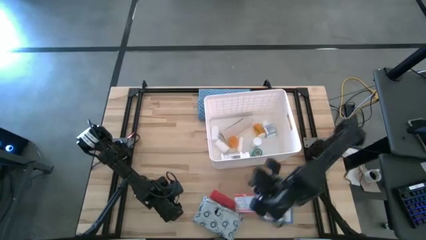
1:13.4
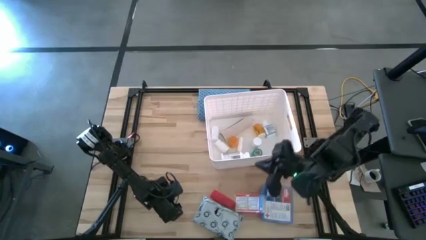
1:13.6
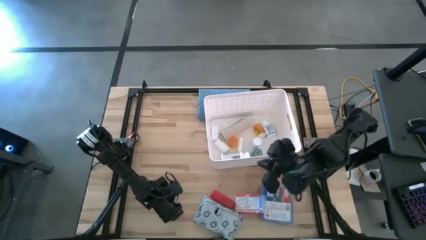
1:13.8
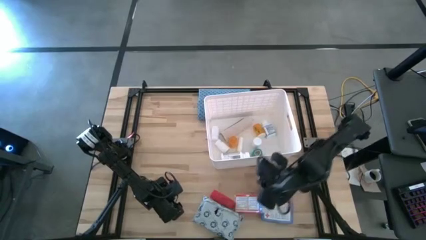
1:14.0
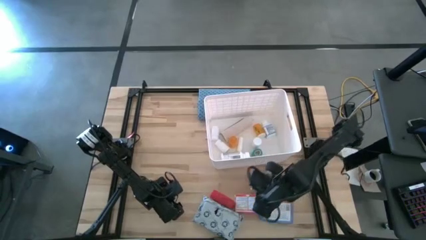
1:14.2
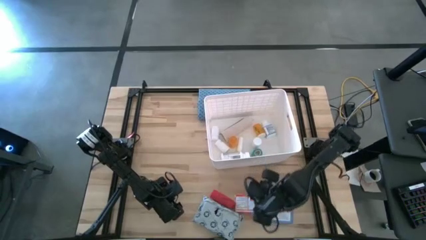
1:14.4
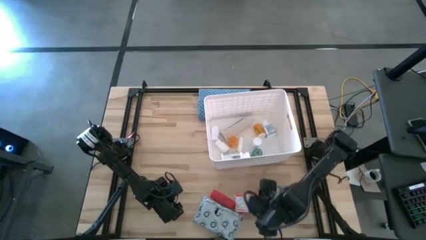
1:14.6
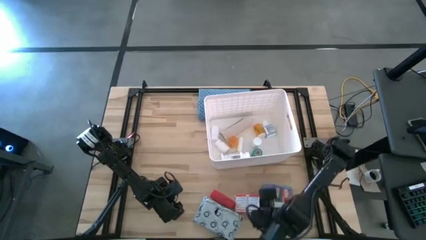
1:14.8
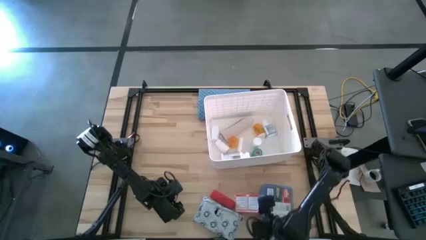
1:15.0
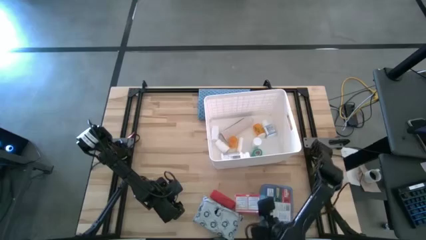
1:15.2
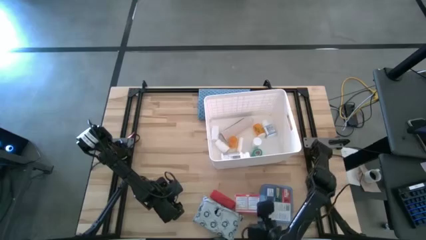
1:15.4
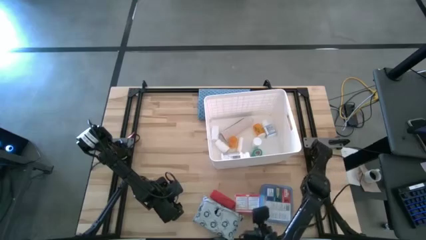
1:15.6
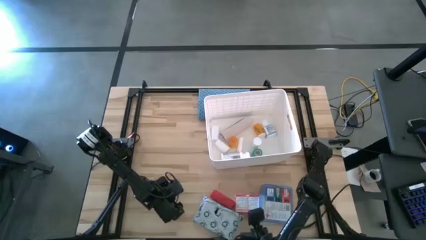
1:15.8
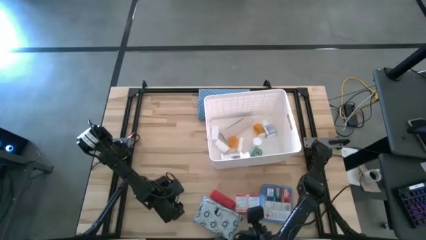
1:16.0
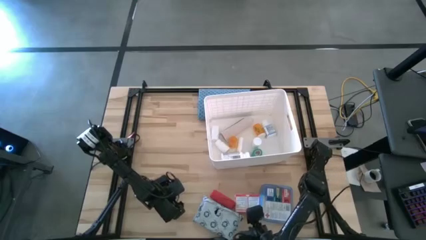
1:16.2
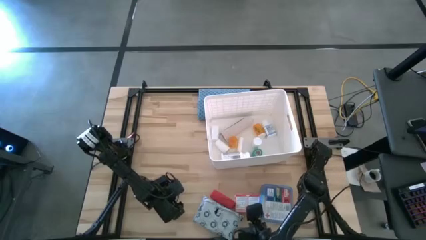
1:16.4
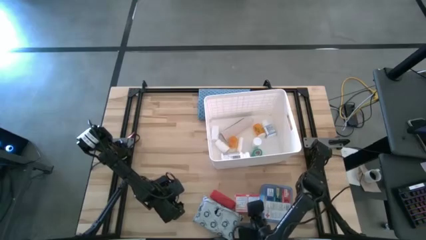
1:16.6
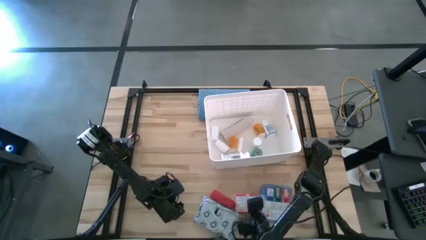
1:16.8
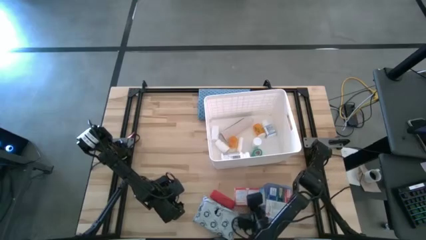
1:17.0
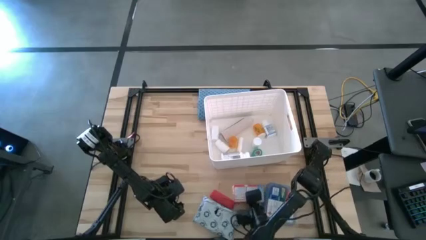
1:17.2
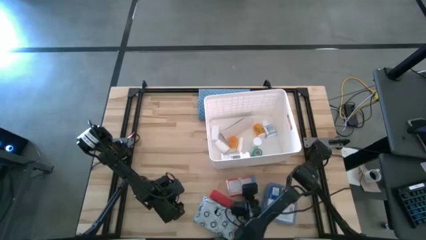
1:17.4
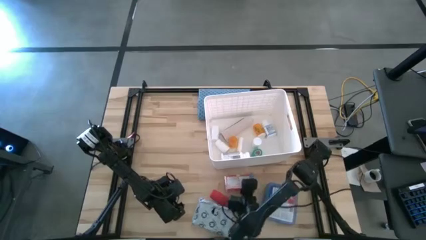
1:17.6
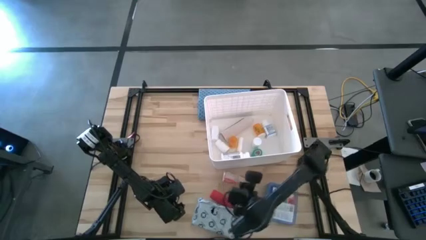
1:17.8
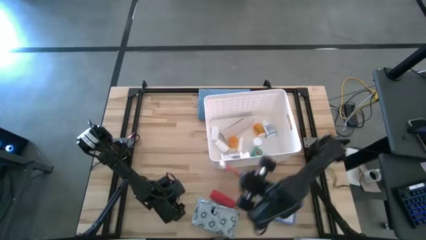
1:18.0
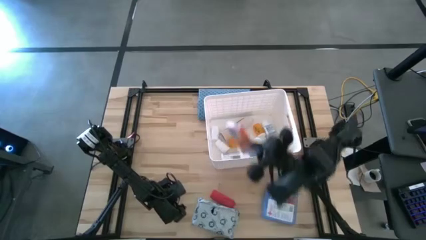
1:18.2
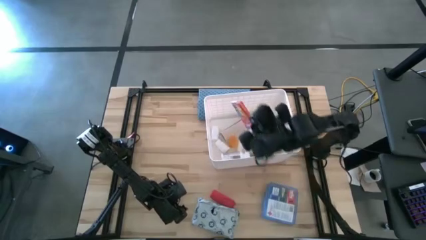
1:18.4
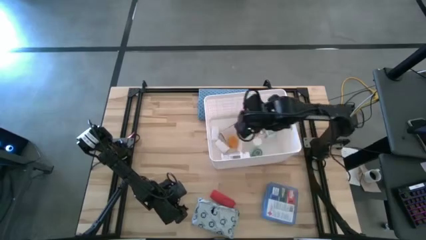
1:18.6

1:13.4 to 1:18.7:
Task: Pick & place medical supplies in basket/bin
Put the red medicine box into the white bin

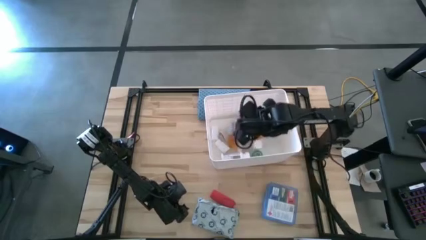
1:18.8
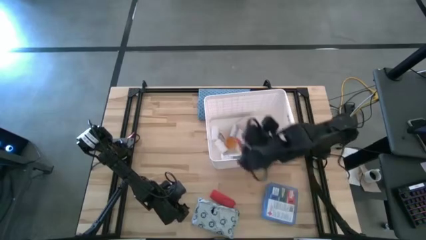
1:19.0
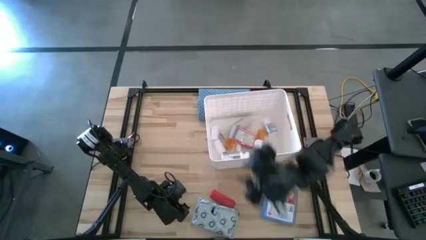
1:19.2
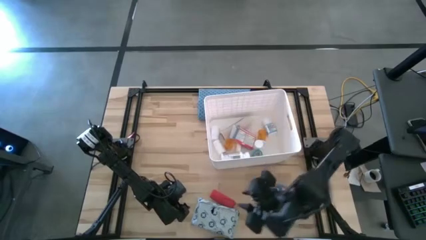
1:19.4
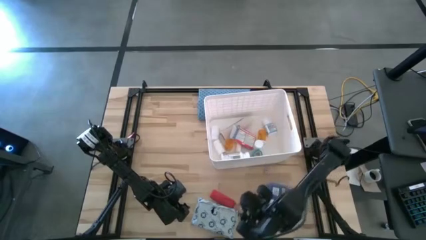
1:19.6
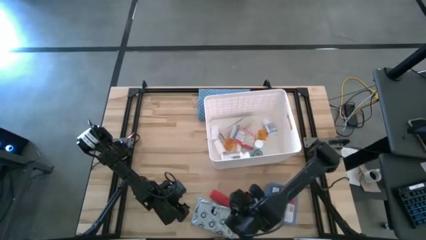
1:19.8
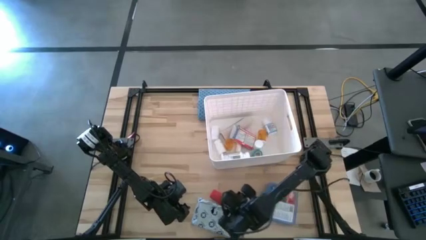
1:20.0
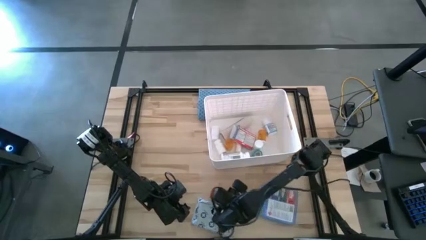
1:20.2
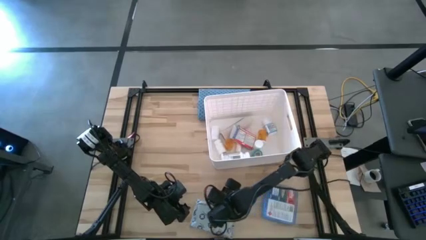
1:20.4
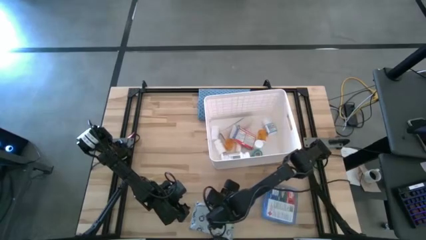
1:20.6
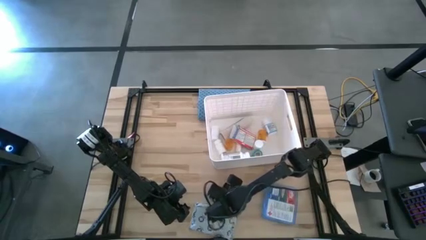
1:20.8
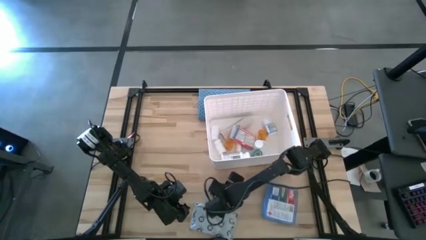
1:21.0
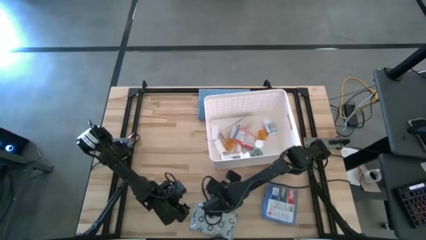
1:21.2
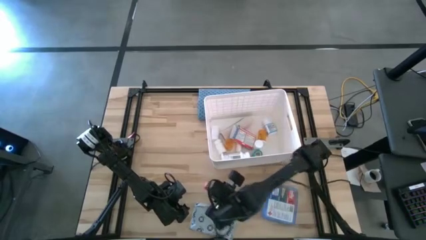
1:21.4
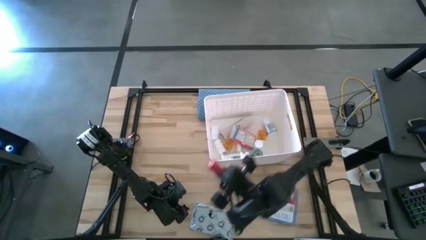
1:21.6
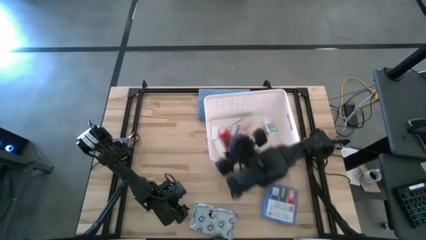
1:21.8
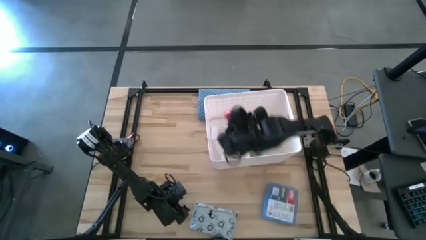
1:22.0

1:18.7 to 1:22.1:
Put the red bandage into the white bin

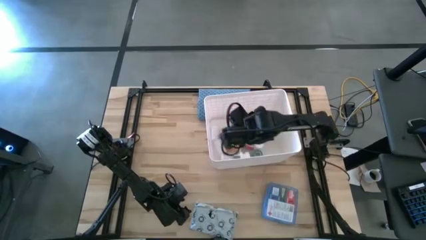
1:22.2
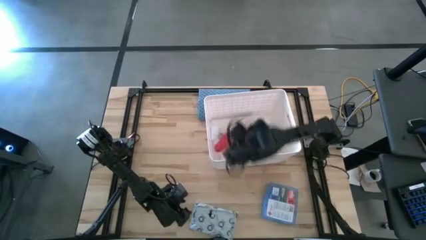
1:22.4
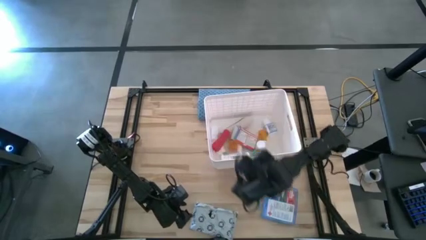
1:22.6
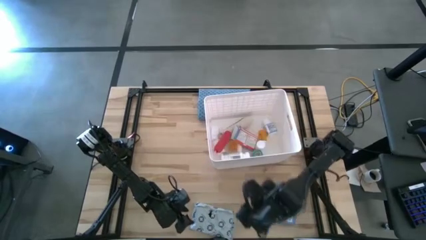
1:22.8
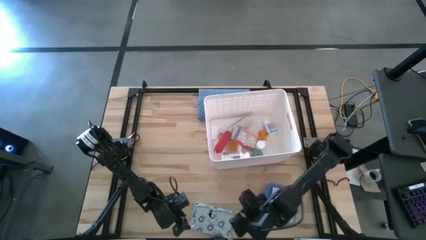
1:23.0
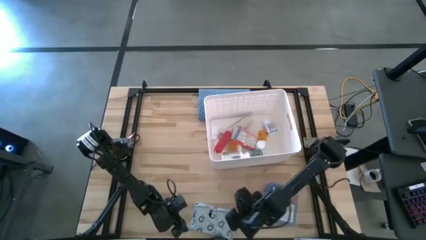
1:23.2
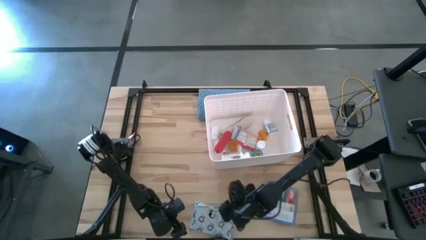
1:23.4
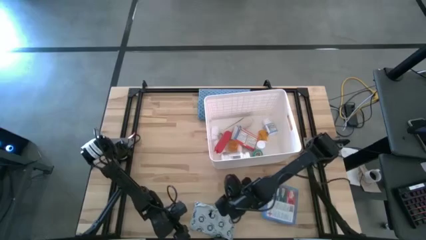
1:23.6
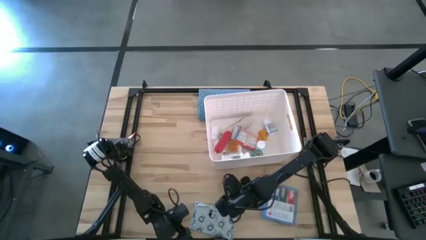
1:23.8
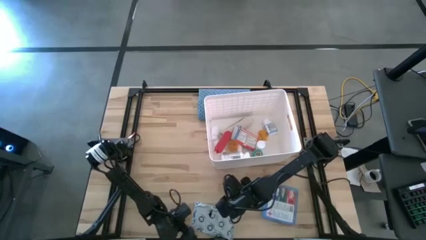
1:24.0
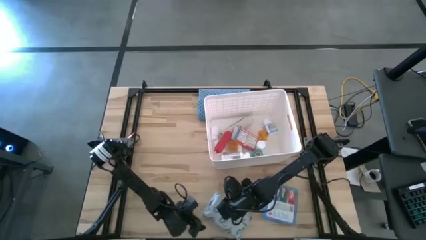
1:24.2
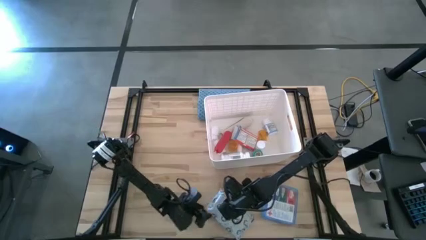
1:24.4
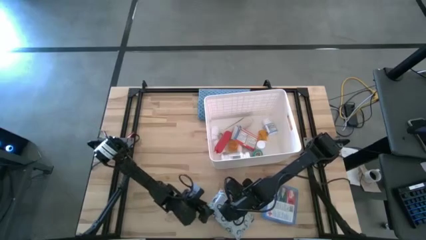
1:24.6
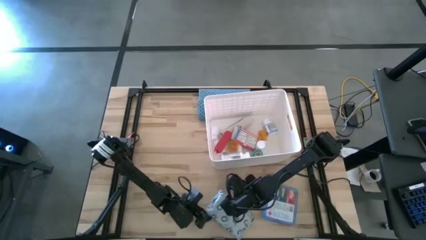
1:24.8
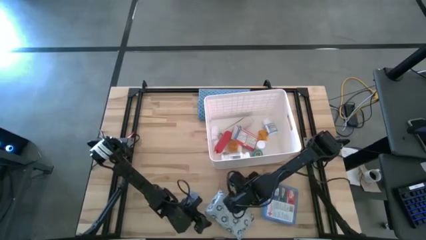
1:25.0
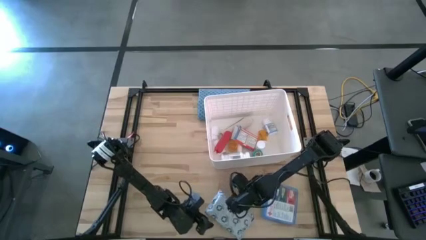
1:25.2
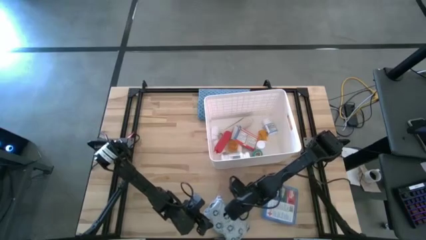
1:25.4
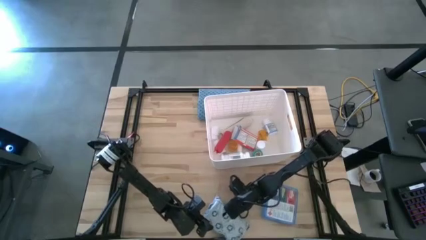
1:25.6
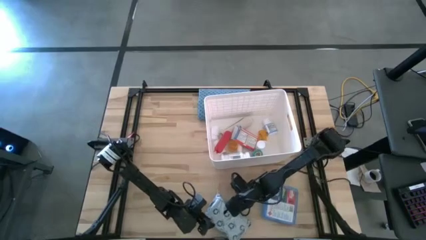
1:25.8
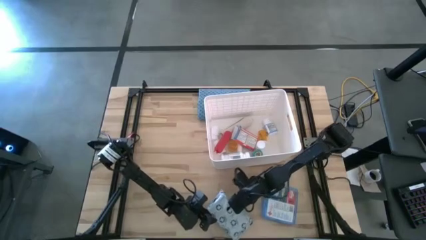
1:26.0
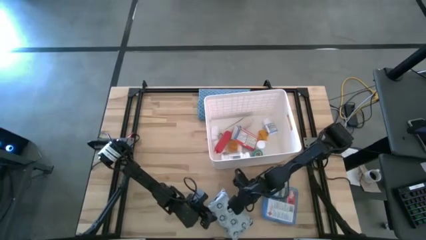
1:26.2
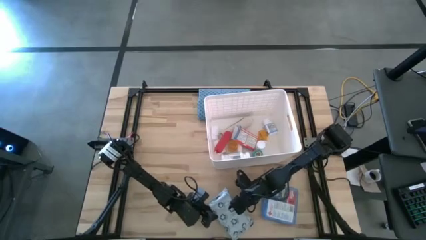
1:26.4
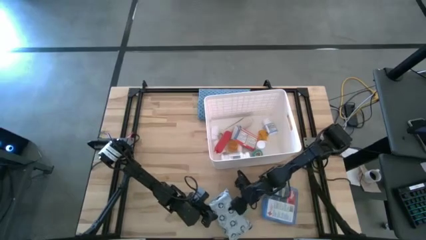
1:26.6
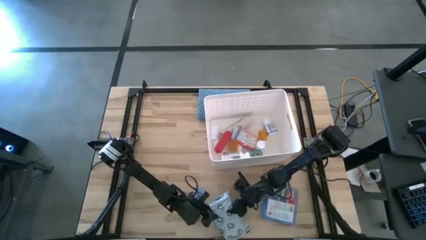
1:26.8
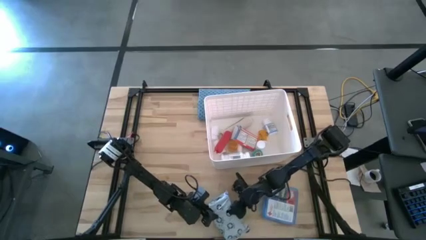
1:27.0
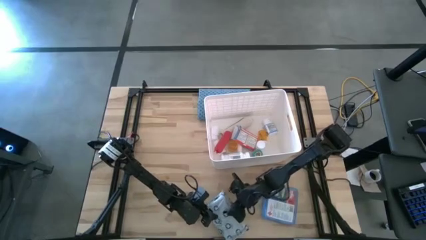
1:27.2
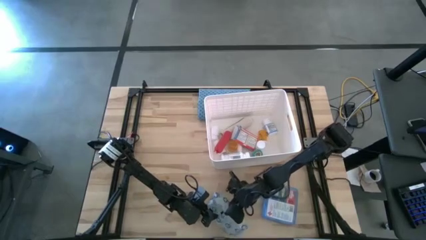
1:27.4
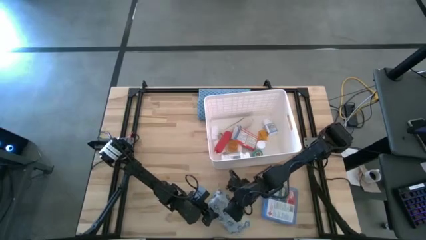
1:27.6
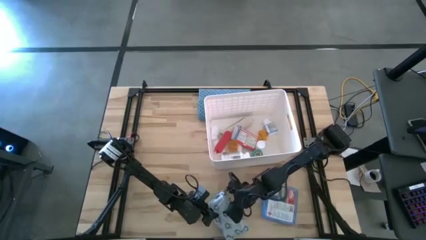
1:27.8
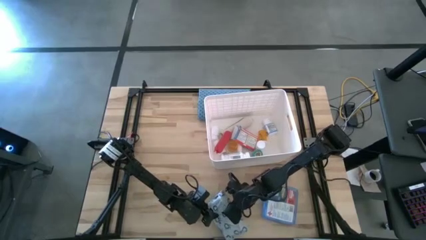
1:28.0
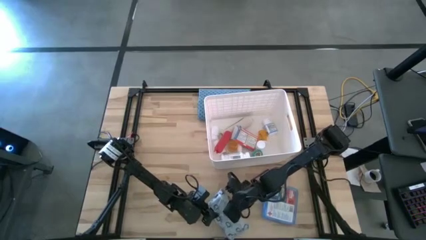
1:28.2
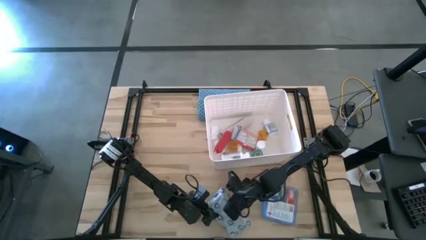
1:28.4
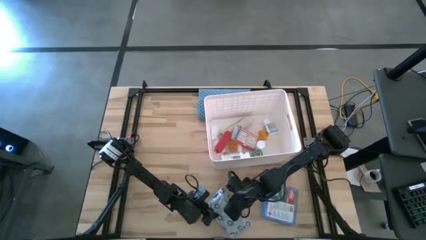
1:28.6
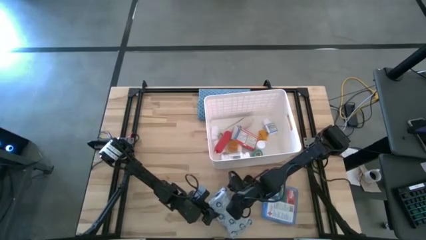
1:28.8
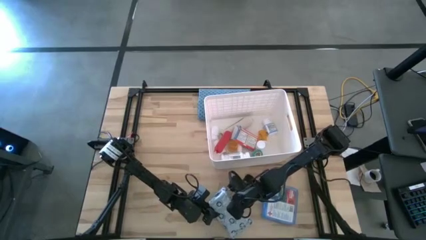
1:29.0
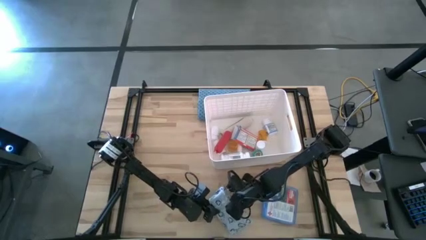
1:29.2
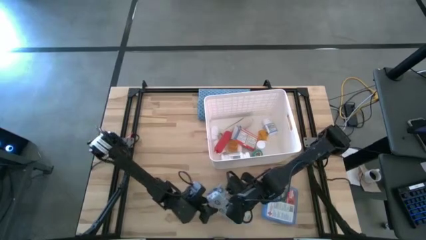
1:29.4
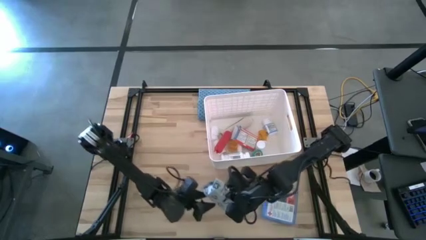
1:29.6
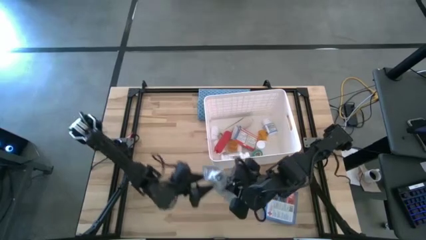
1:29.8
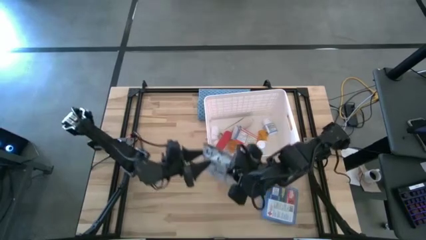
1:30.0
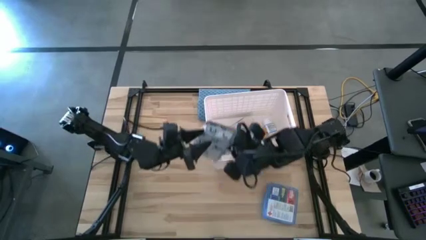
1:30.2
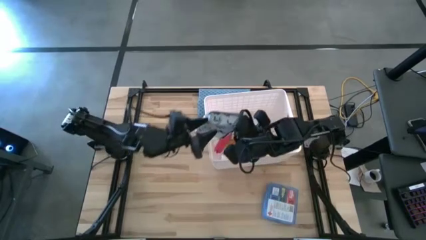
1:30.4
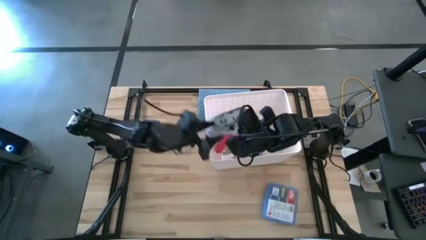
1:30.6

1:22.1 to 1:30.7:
Put the white mailer bag into the white bin
